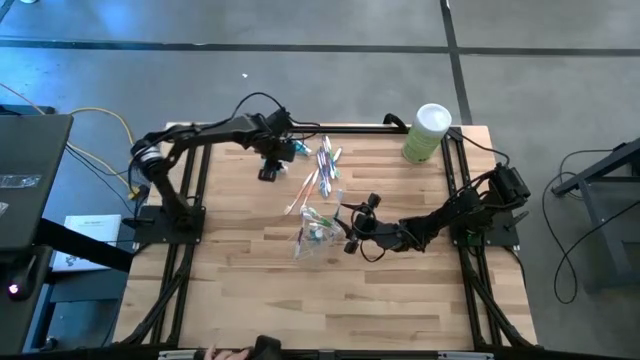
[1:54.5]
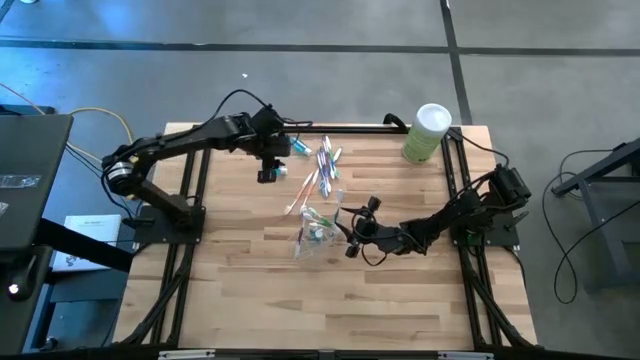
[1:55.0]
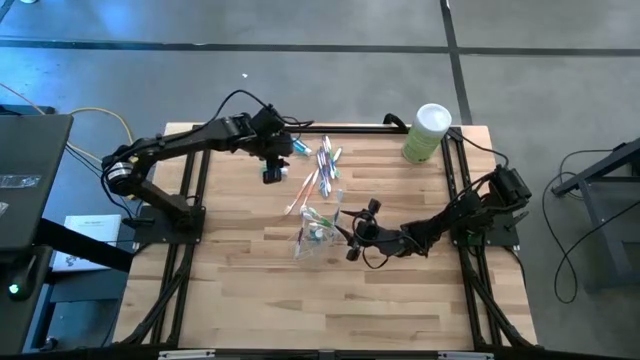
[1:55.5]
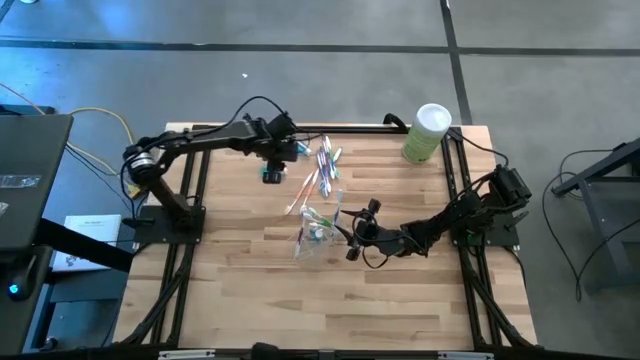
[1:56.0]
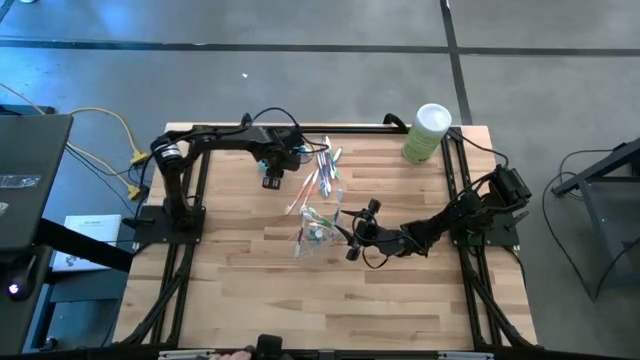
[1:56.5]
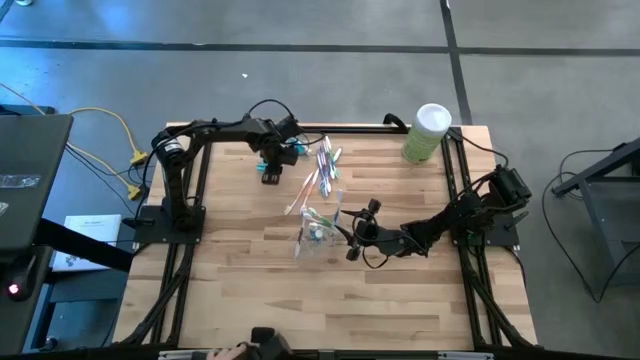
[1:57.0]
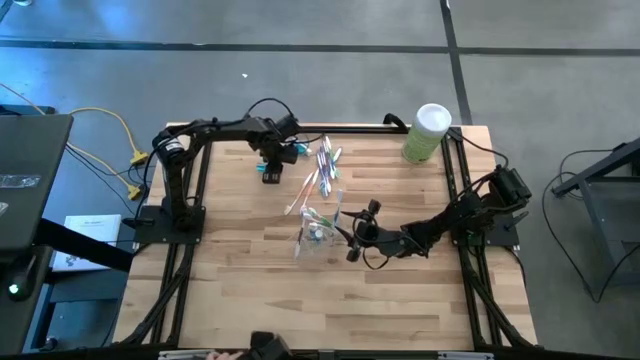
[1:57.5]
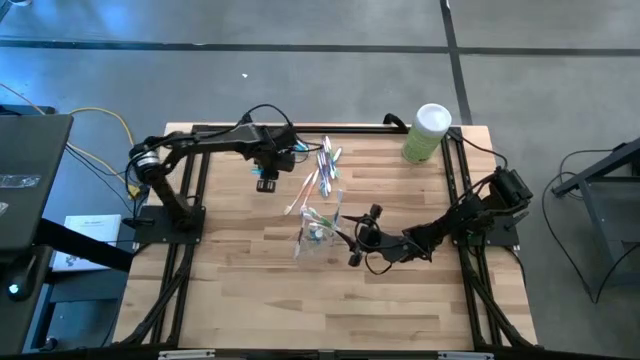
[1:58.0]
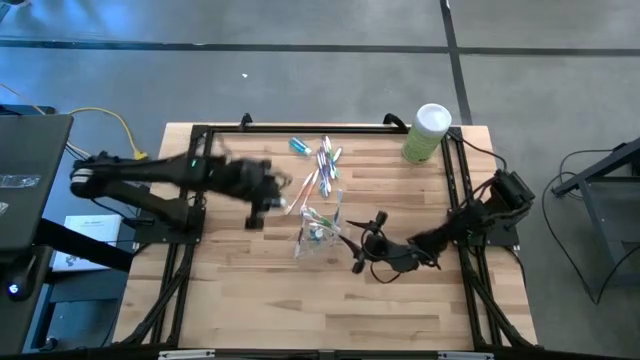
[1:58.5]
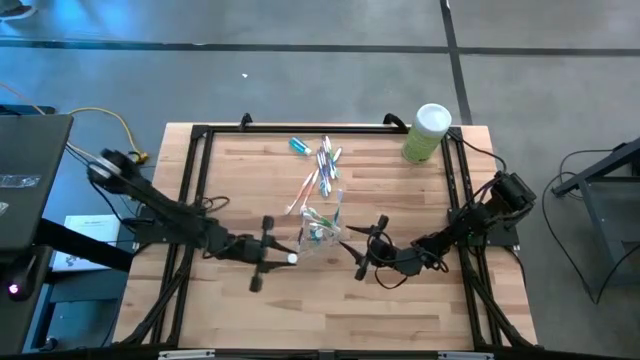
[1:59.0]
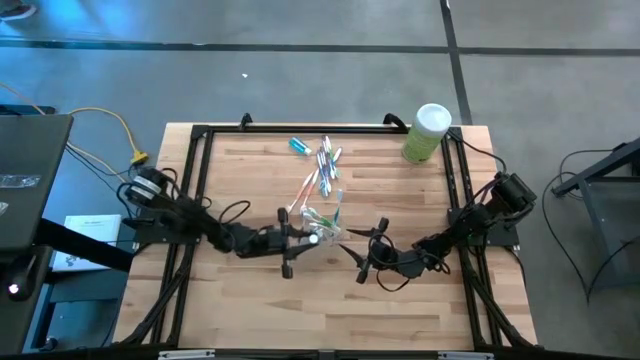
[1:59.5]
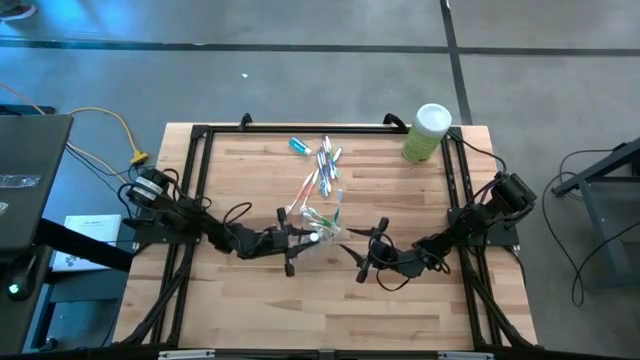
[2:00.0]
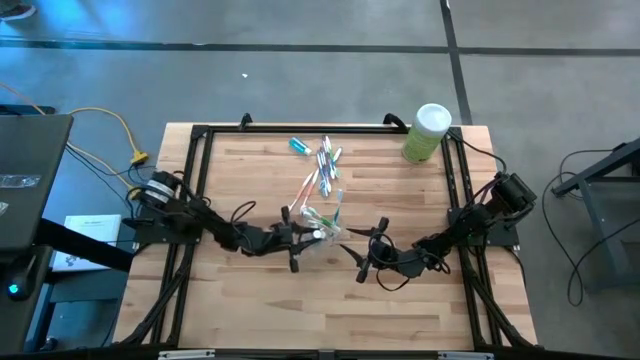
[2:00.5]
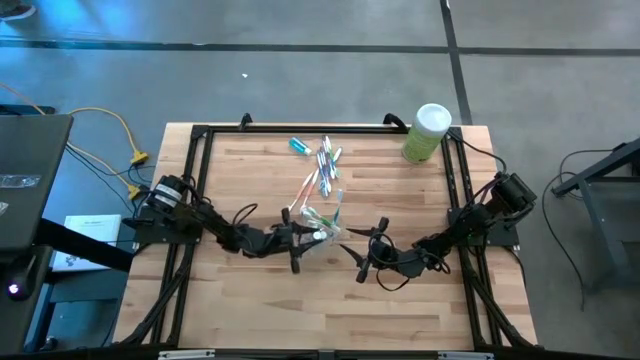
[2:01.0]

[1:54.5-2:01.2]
Task: Pick & Place toothbrushing station
Put the blue mouthwash into the transparent organizer

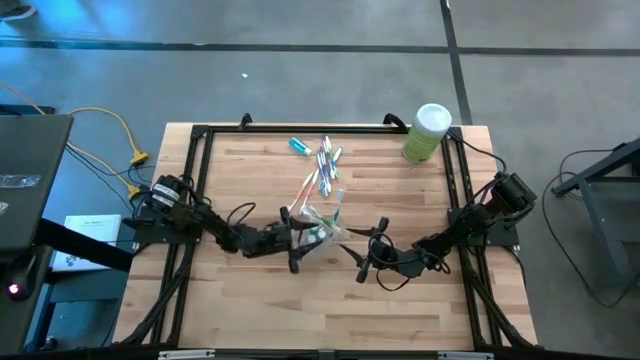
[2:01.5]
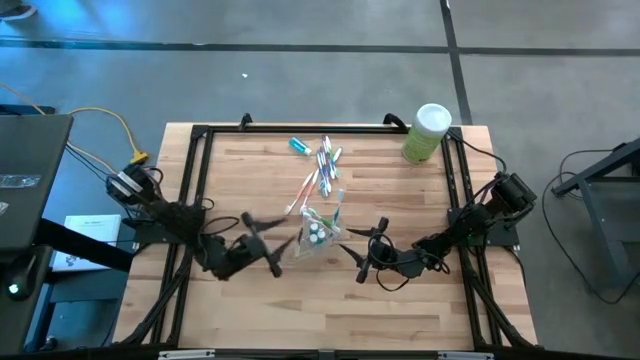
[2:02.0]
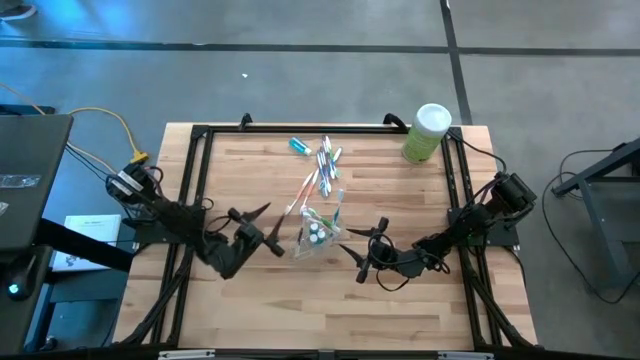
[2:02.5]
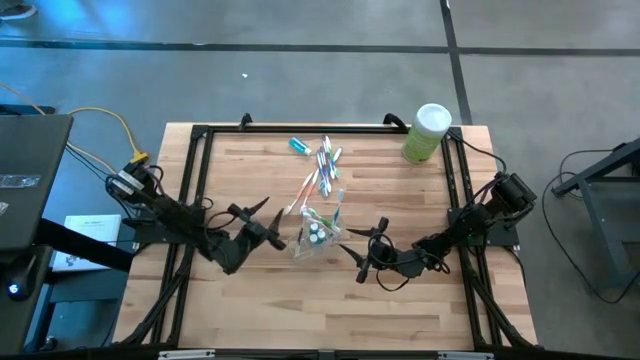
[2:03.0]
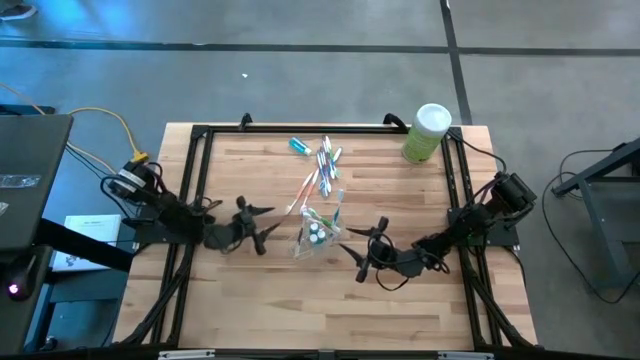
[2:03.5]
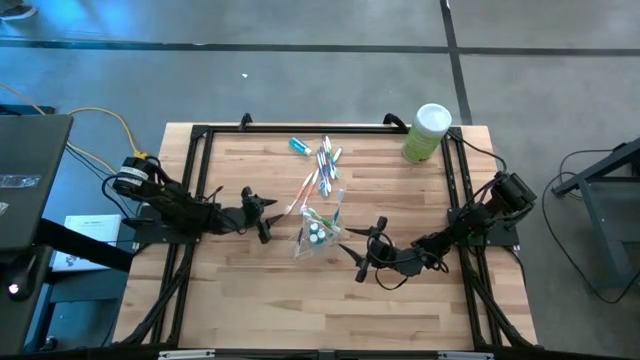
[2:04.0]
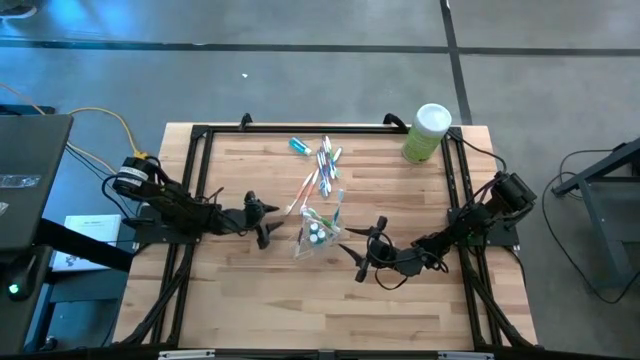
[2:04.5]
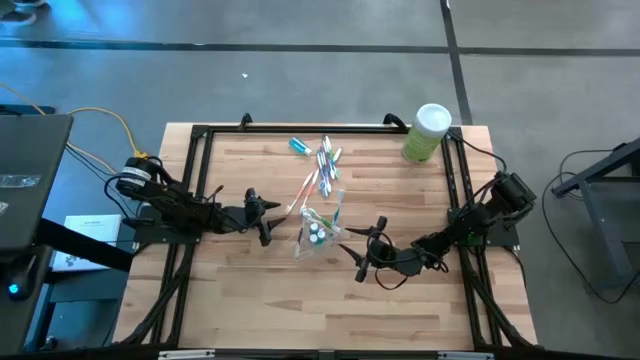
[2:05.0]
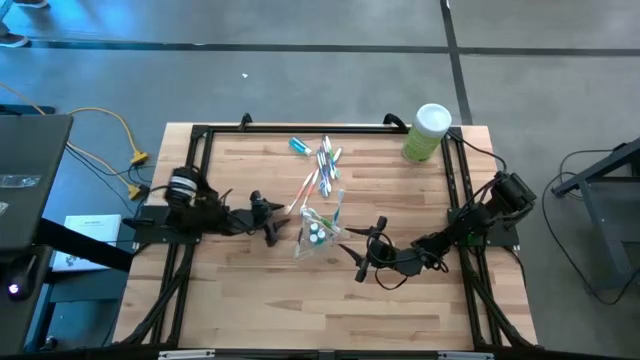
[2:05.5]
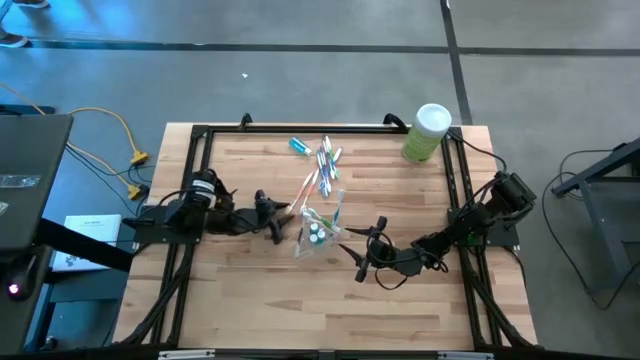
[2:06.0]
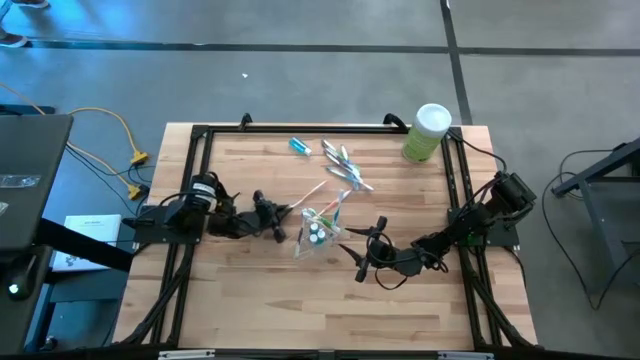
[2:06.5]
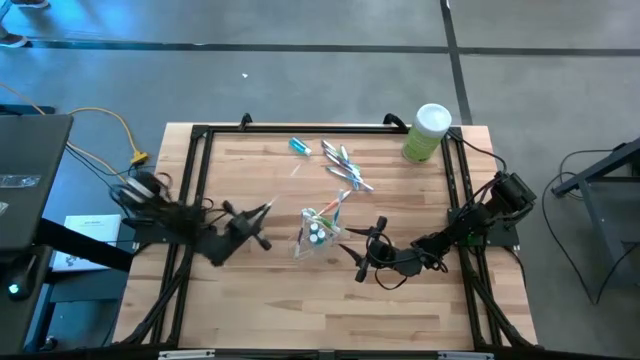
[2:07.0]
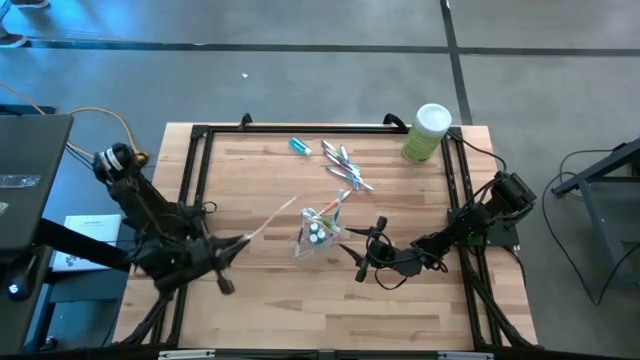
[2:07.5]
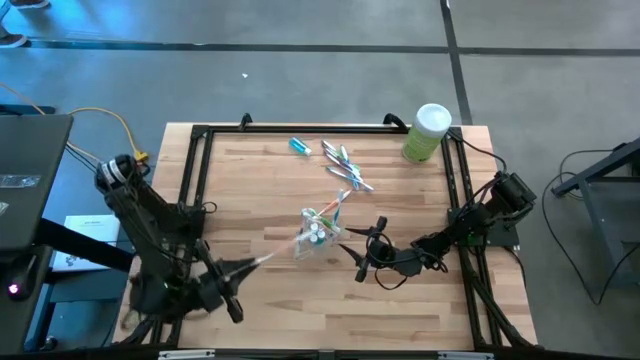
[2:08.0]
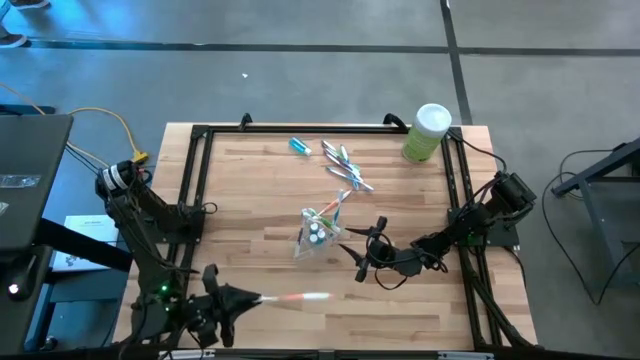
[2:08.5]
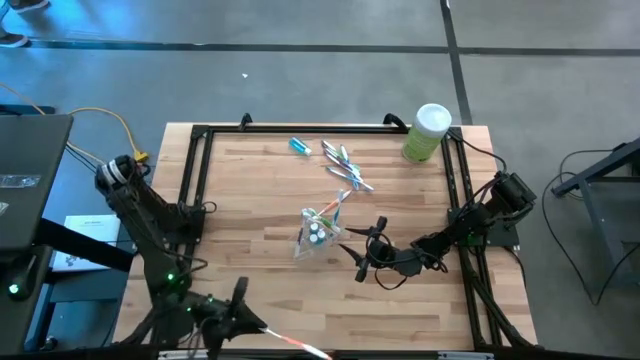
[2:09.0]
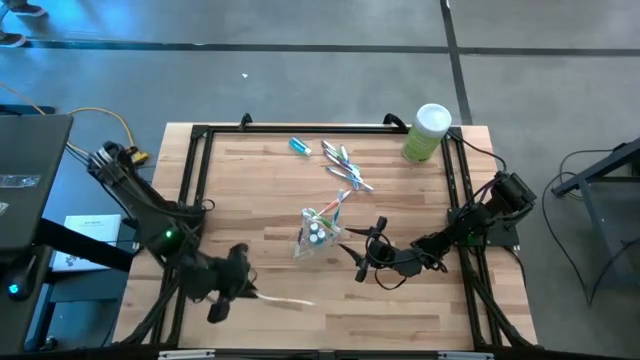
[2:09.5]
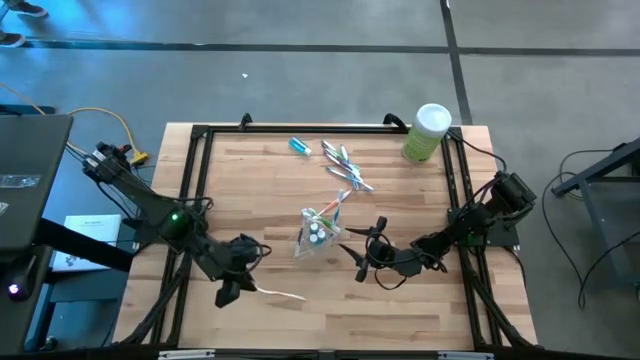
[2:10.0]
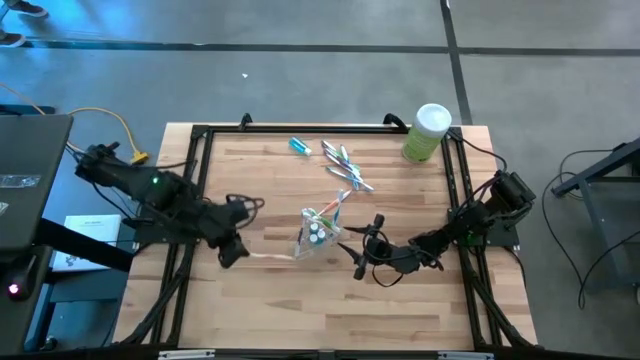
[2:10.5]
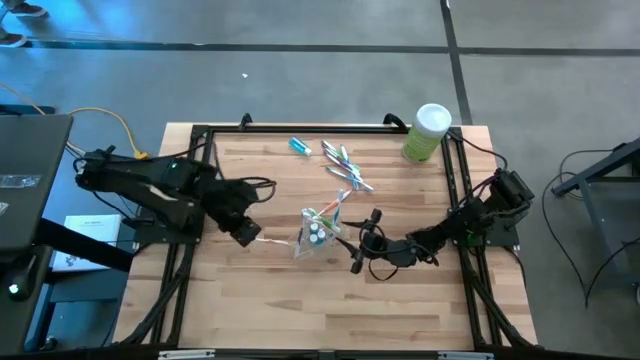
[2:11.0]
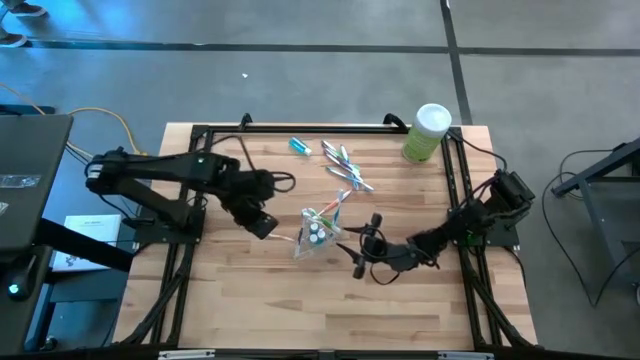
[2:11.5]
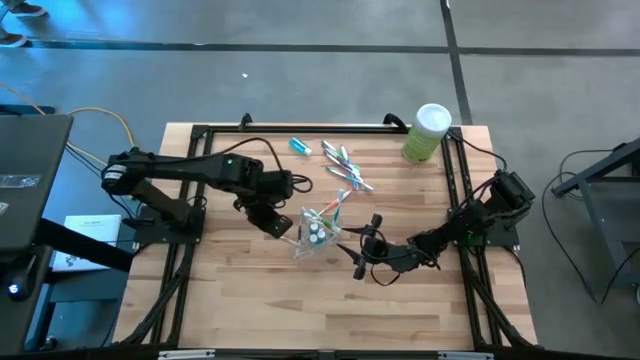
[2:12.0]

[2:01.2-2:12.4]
Put the orange toothbrush into the transparent organizer

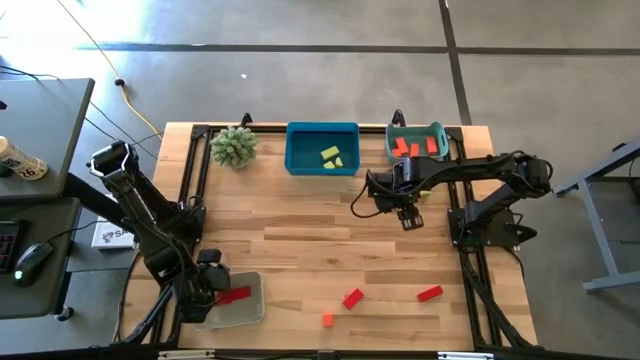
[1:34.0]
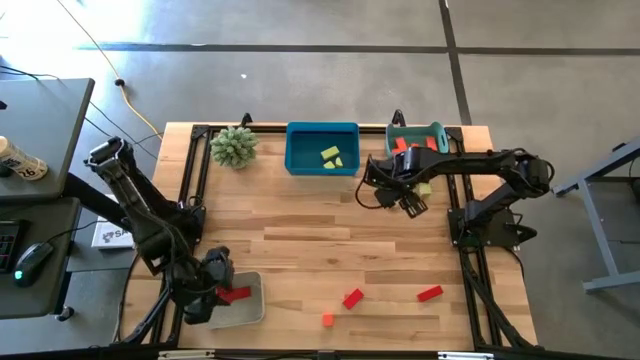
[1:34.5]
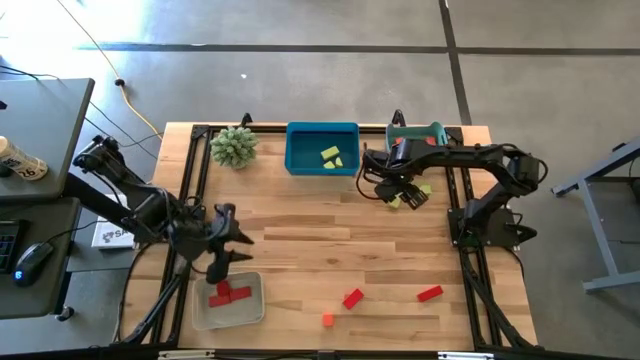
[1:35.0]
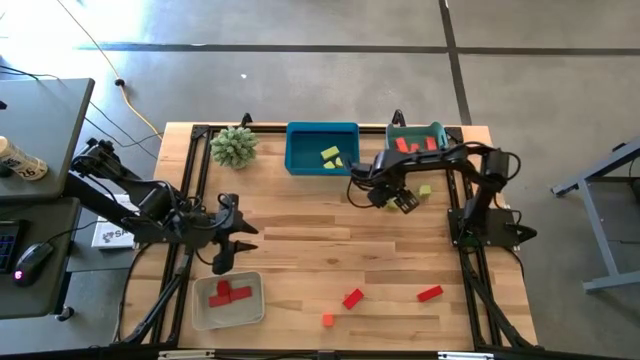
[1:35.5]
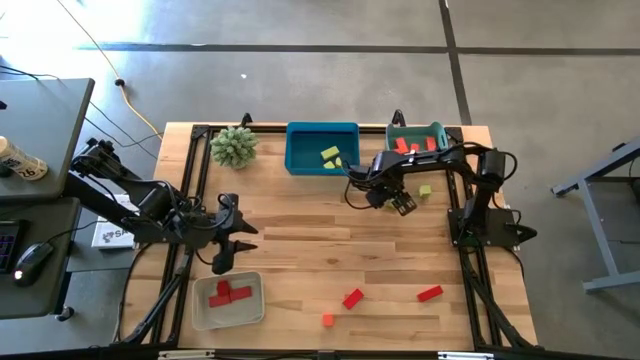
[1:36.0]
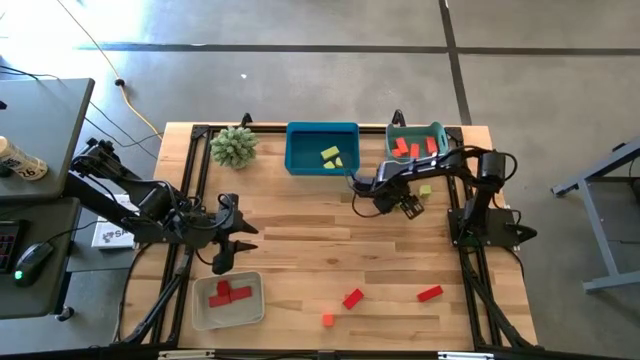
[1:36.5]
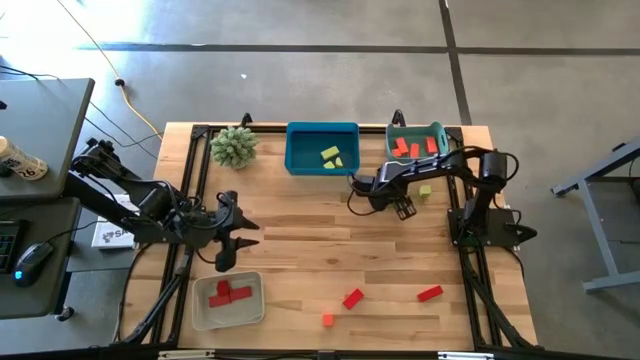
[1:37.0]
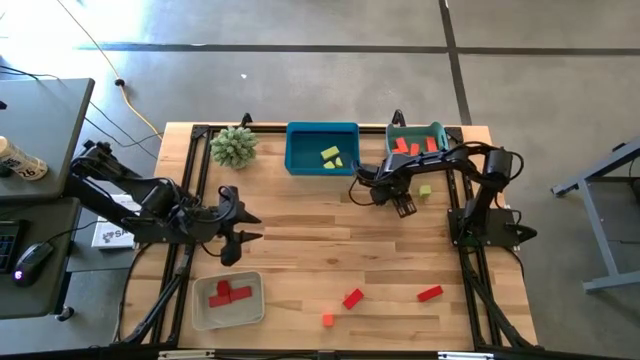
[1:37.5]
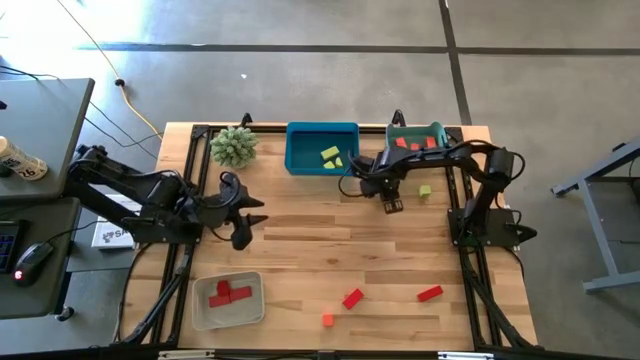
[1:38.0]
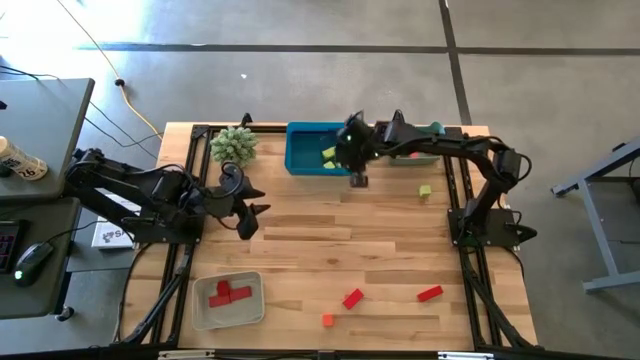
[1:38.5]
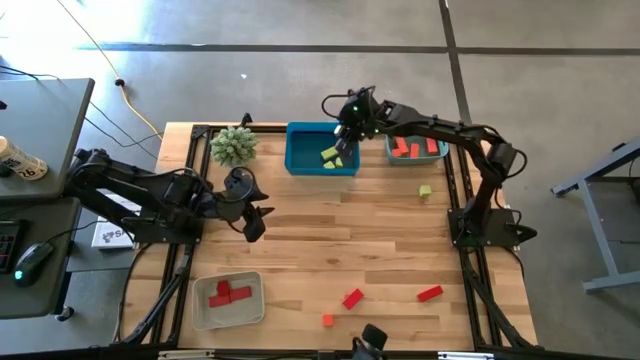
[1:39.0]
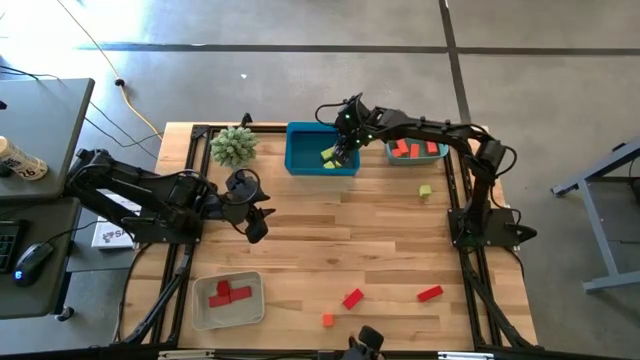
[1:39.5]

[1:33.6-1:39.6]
Task: Sort & place blocks by color
Put the green block into the blue bin
